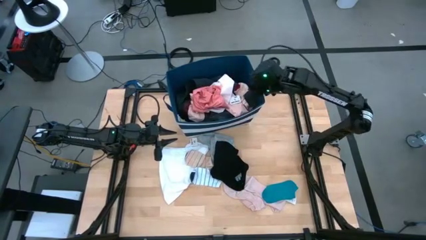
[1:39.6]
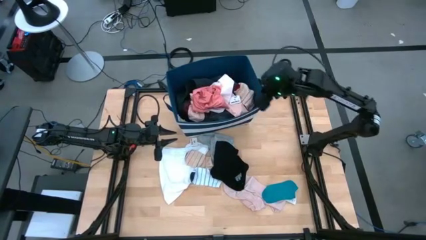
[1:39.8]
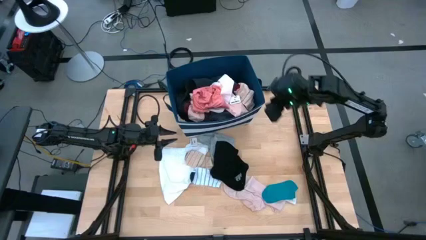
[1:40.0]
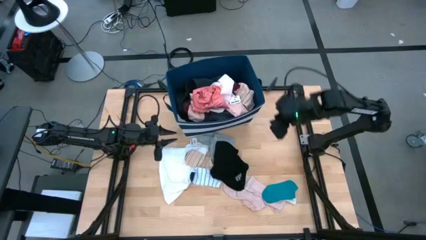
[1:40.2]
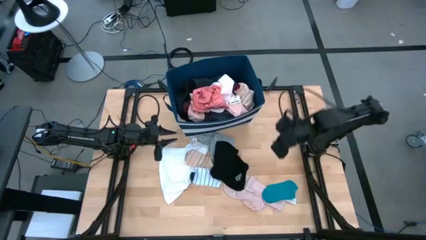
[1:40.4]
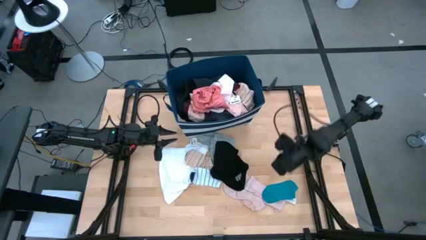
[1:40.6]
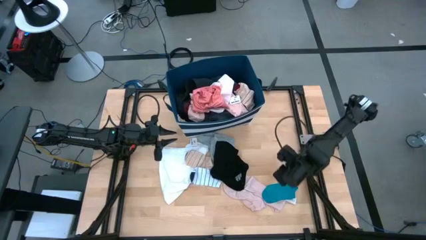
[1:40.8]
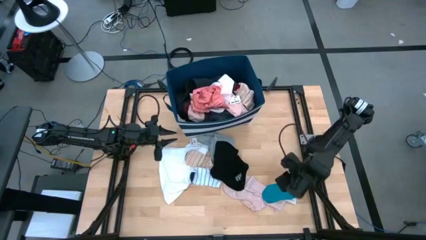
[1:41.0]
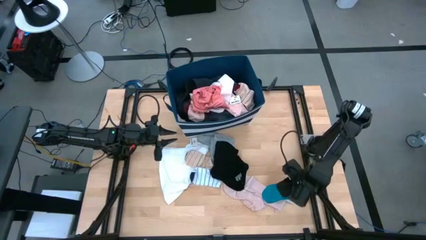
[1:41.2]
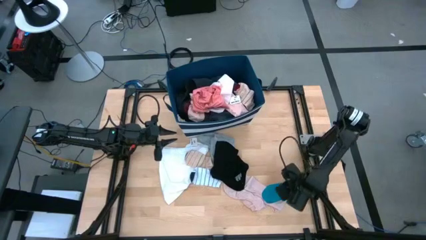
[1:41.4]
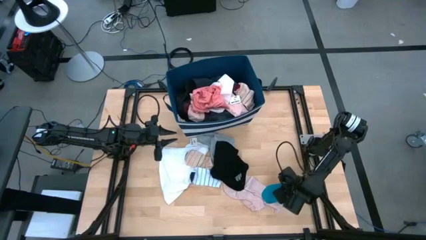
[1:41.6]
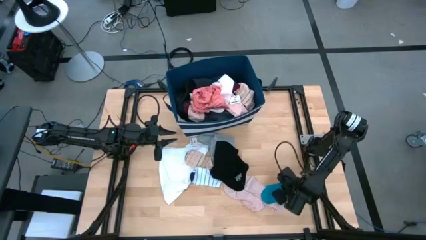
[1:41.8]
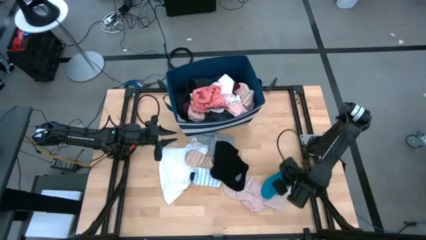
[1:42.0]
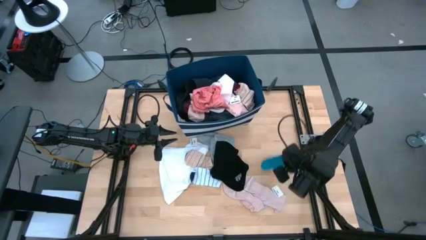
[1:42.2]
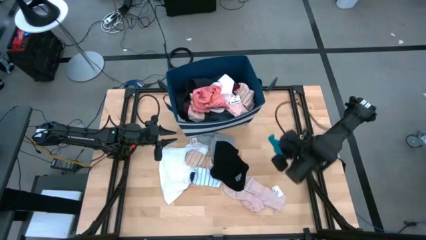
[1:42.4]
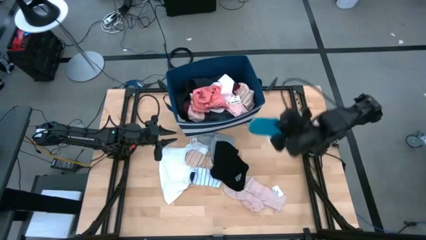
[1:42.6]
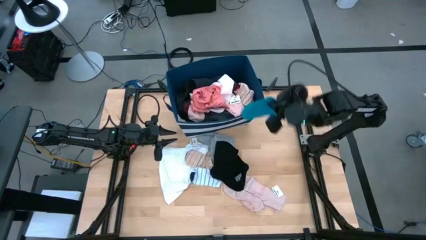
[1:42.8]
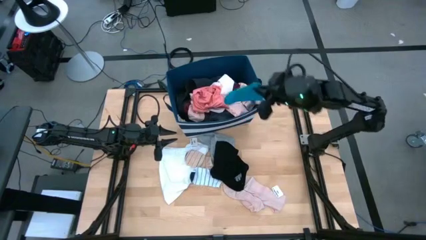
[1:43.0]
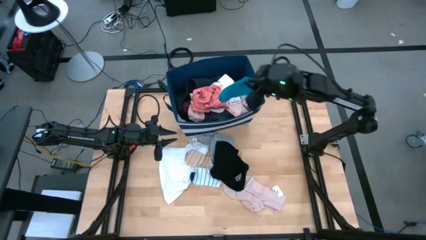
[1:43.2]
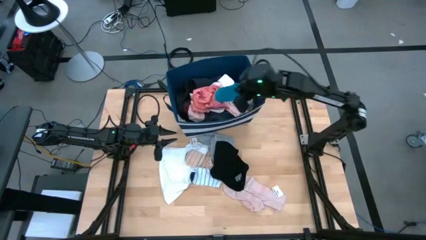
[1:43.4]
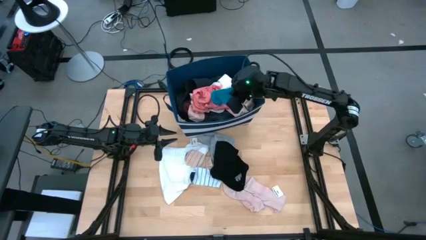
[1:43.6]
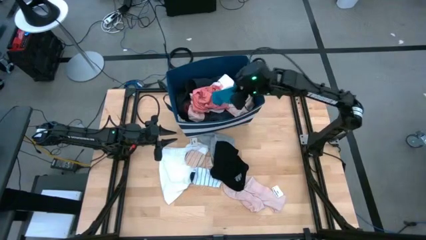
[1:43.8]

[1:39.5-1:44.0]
Task: Sort clothes
Put the blue sock into the blue laundry bin

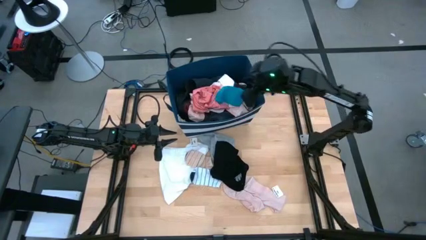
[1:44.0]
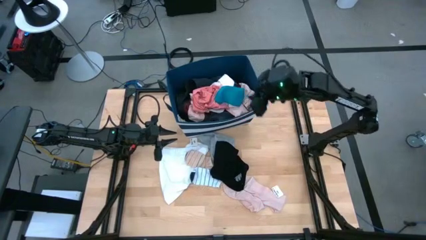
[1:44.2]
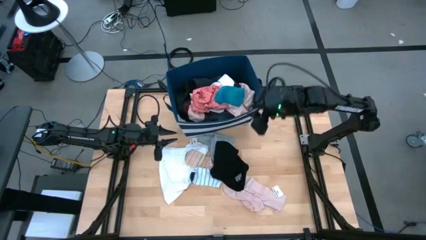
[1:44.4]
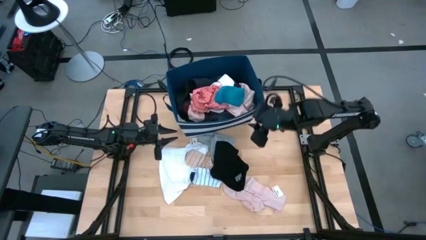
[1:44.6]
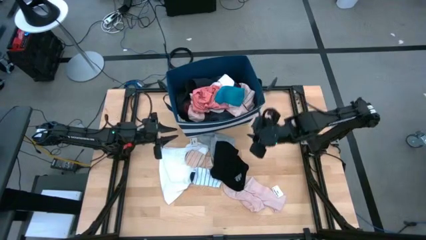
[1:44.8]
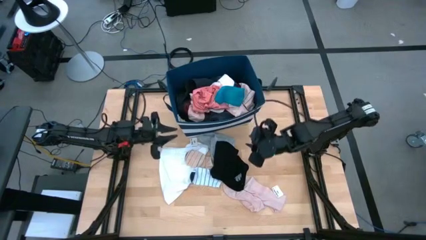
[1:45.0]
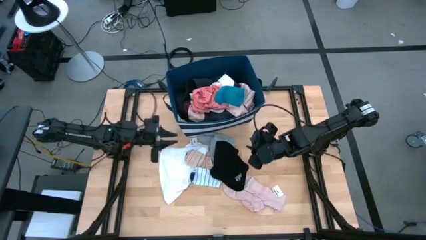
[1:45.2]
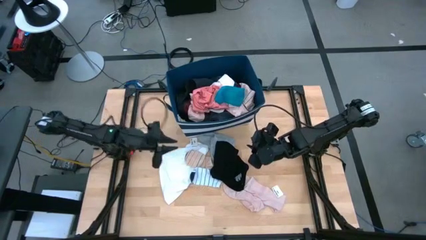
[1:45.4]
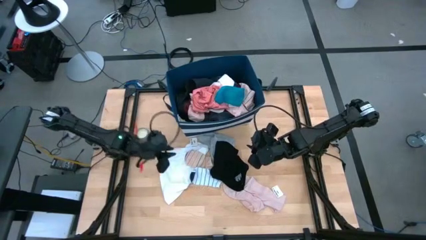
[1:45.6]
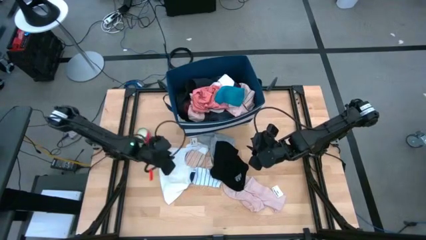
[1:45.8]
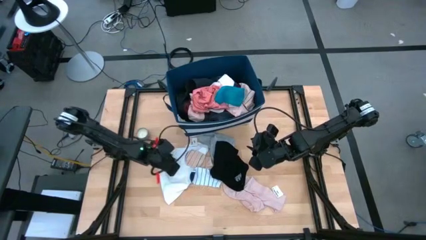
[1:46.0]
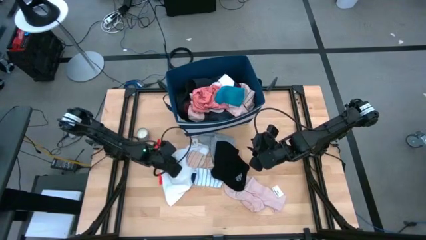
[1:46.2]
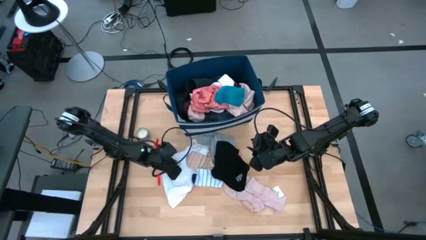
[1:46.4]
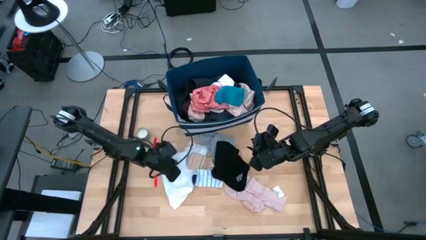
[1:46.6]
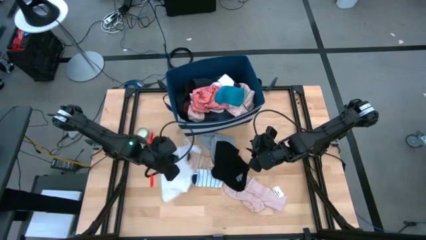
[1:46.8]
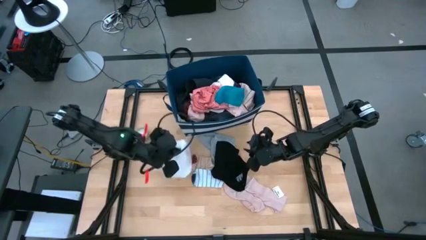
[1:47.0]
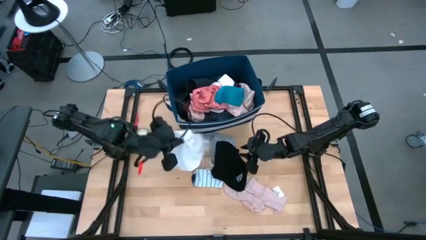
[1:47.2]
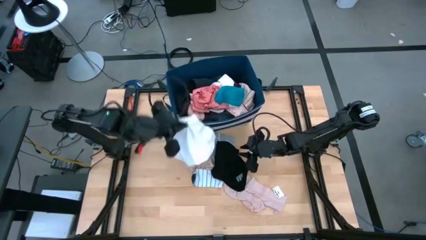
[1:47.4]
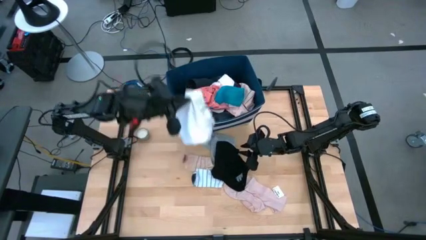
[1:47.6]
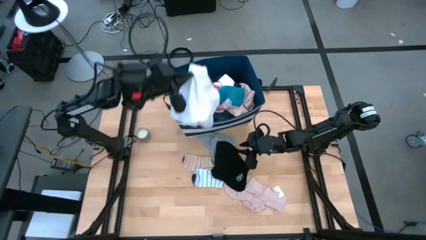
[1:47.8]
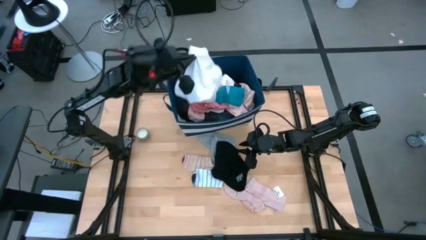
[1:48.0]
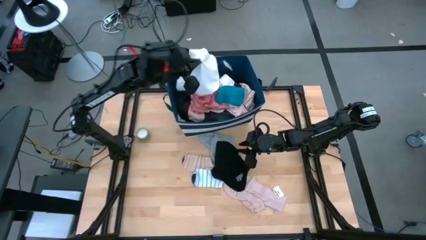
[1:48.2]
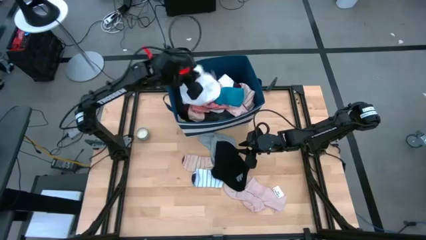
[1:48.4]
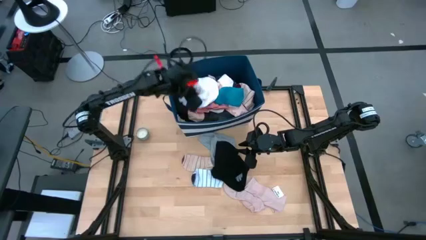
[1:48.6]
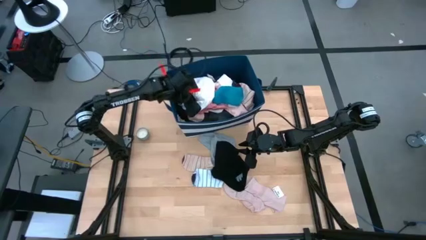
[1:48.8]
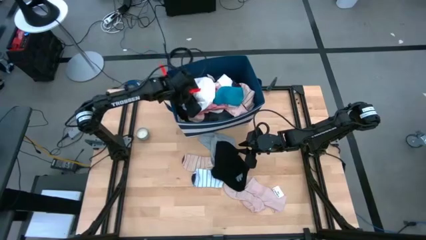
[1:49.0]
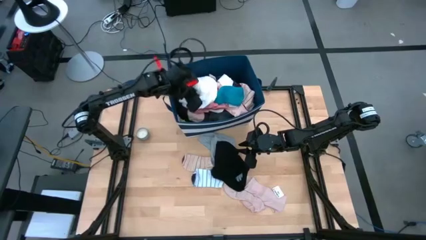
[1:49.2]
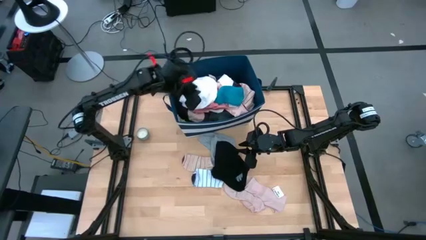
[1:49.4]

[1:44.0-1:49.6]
Put the white short into the blue laundry bin

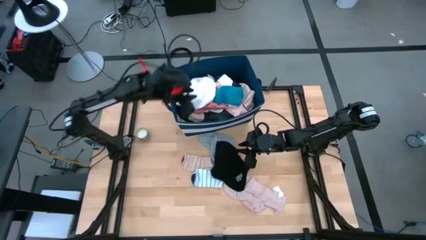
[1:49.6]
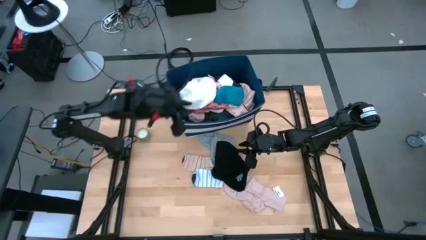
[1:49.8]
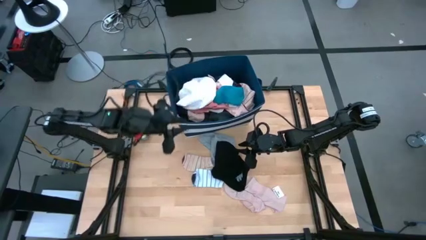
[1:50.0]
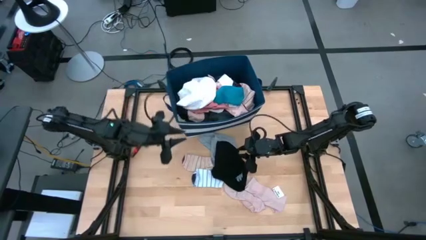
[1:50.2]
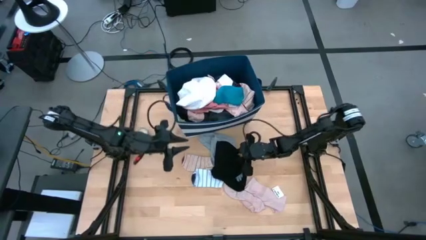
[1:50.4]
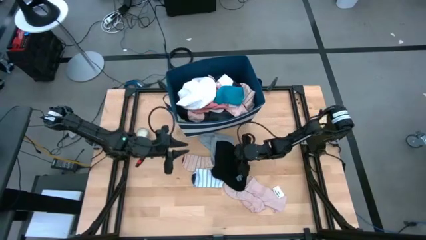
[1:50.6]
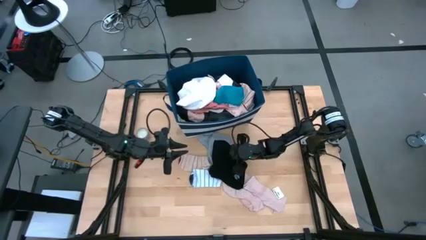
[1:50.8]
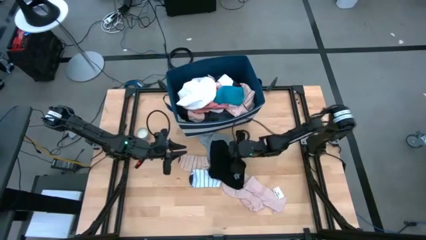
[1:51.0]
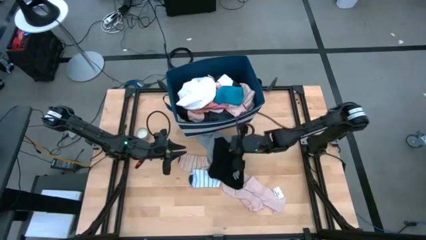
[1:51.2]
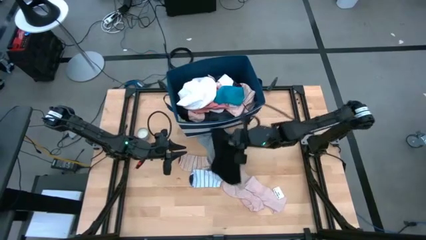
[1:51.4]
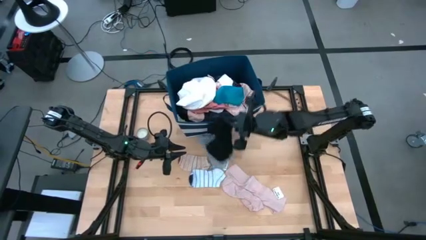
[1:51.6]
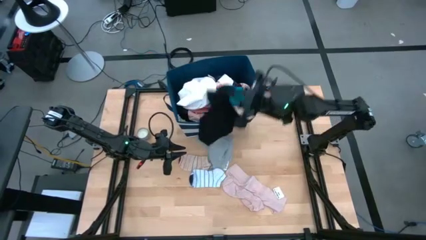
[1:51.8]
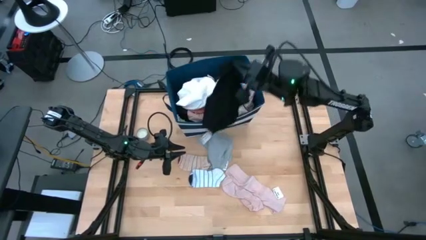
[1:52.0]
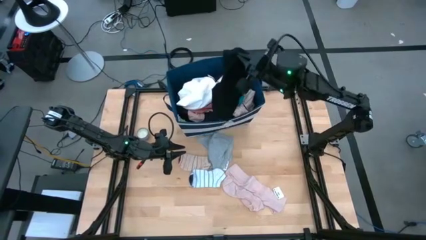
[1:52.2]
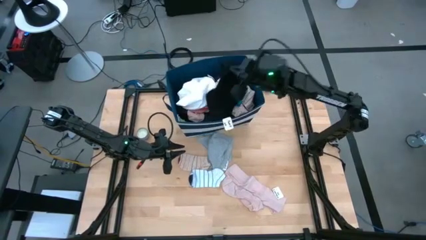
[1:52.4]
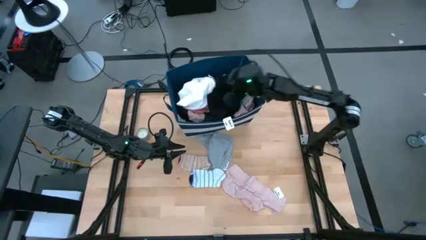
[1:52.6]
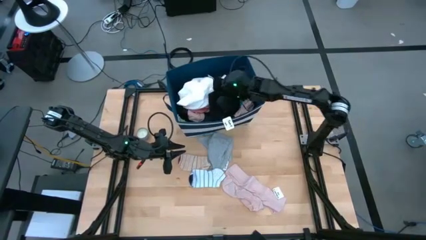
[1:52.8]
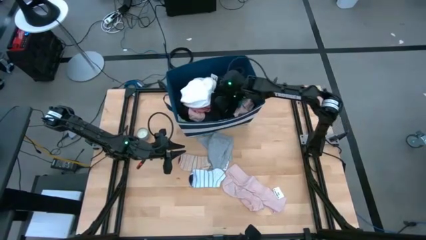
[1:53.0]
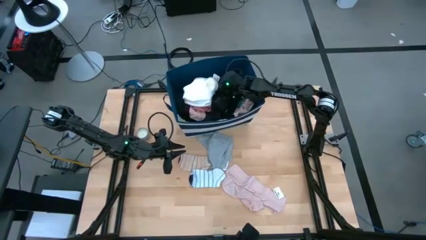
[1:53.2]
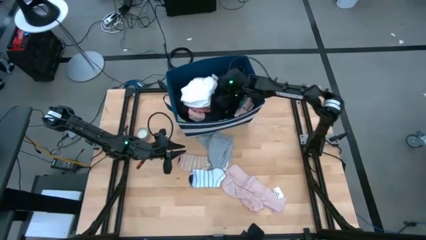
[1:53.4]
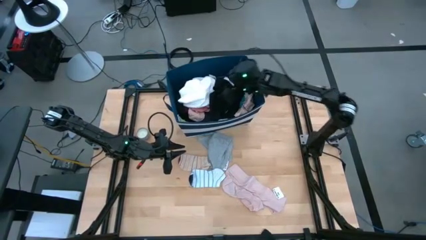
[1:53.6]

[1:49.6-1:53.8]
Put the black underwear into the blue laundry bin

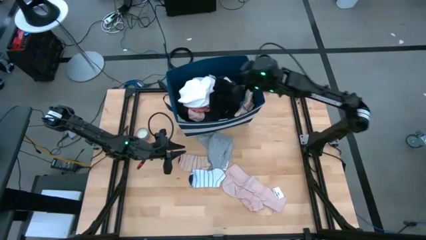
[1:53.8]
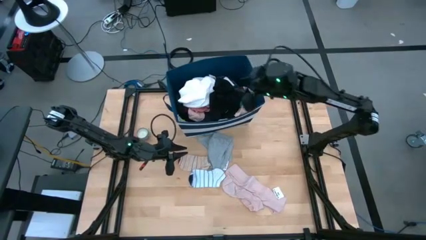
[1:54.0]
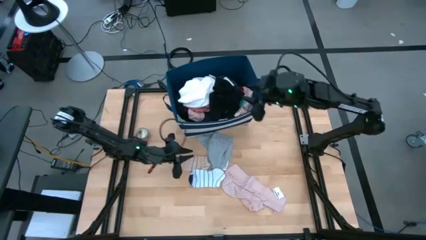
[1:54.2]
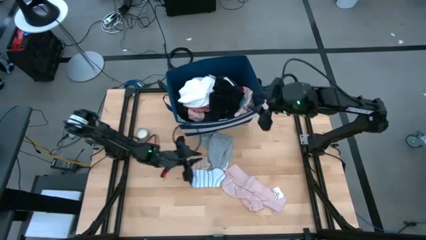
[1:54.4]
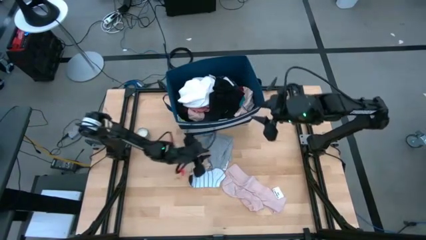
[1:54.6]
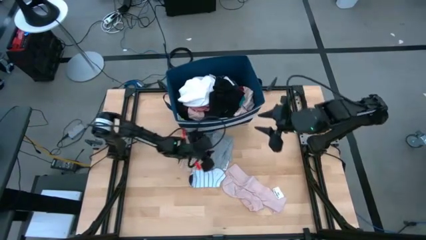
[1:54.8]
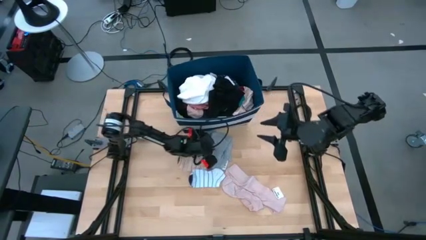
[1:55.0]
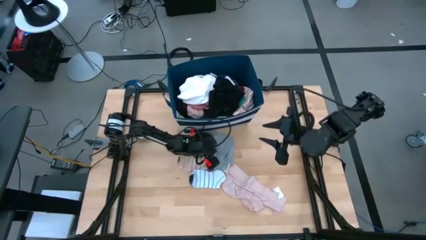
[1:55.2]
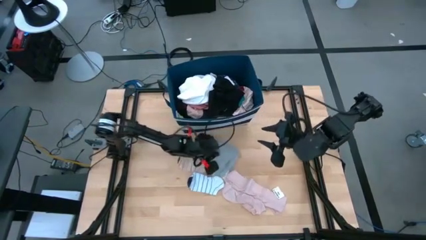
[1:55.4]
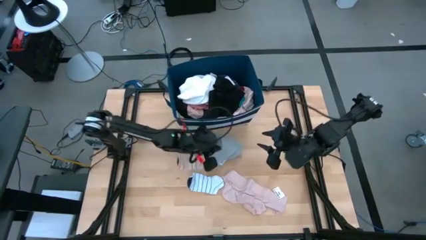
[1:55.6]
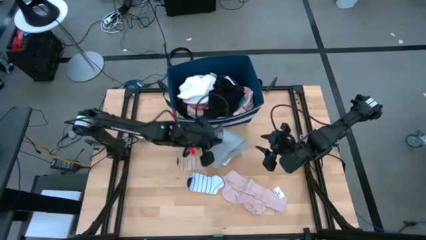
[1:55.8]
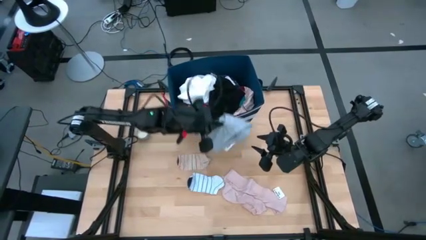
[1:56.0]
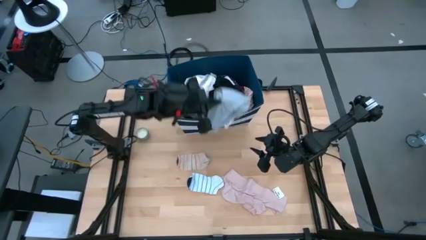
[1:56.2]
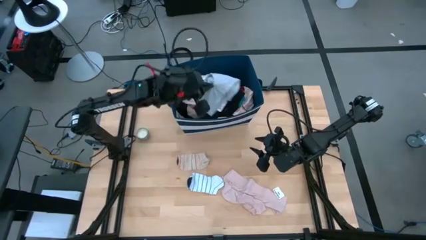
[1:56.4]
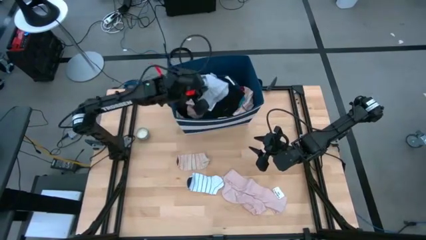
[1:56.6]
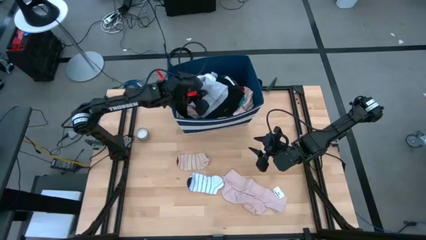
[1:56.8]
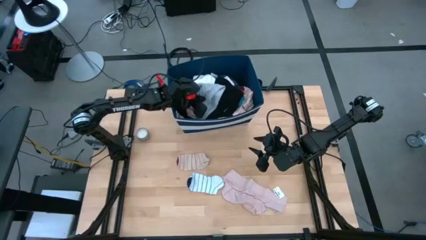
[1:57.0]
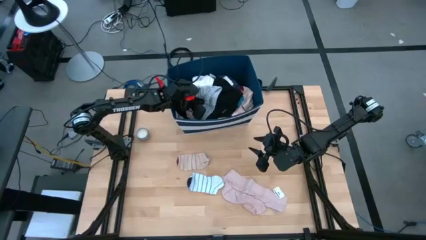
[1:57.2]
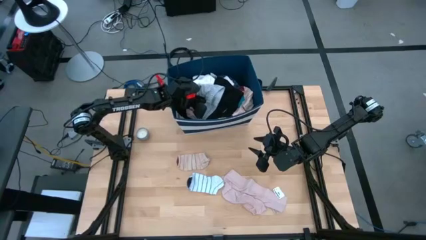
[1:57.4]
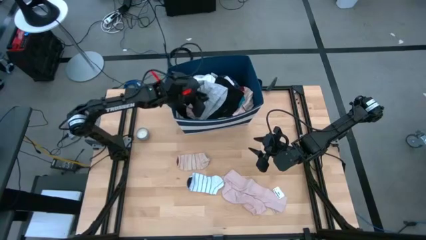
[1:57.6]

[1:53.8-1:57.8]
Put the gray underwear into the blue laundry bin
